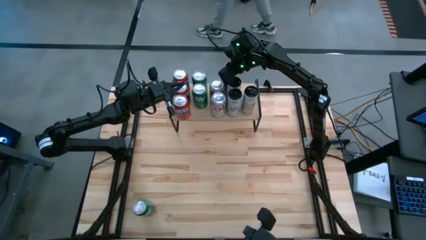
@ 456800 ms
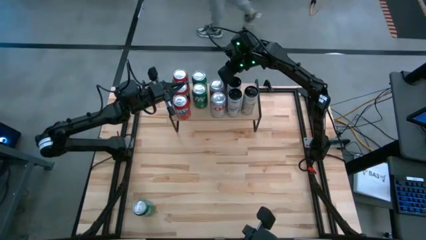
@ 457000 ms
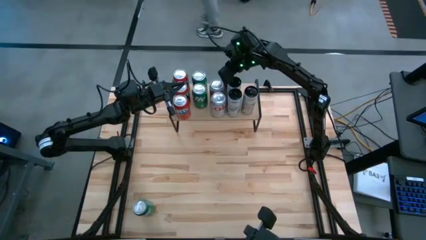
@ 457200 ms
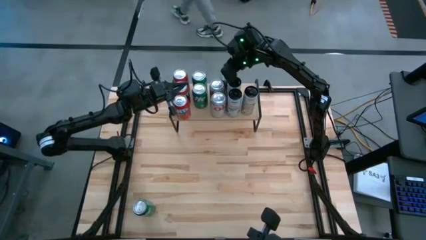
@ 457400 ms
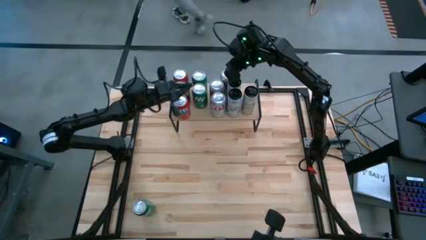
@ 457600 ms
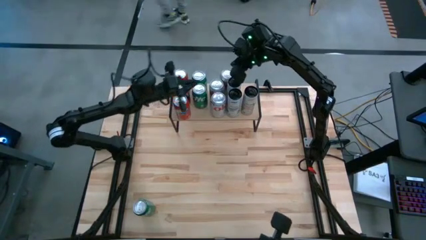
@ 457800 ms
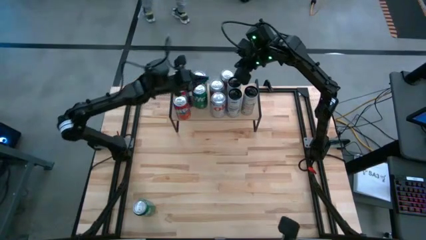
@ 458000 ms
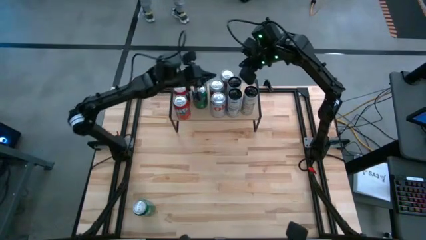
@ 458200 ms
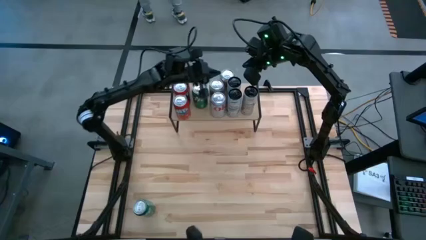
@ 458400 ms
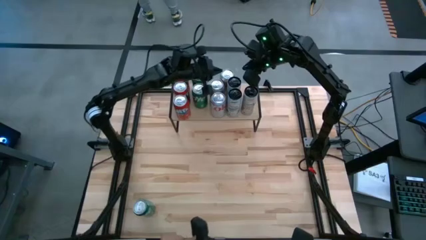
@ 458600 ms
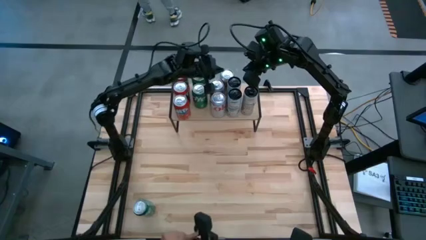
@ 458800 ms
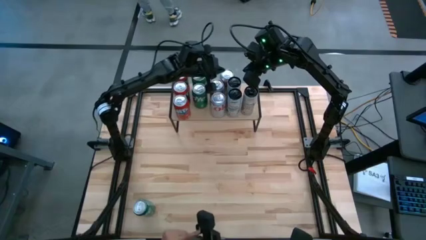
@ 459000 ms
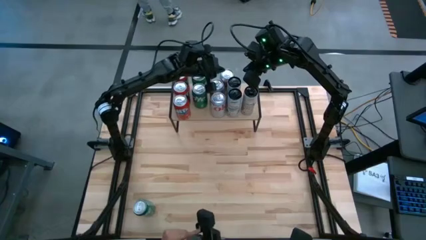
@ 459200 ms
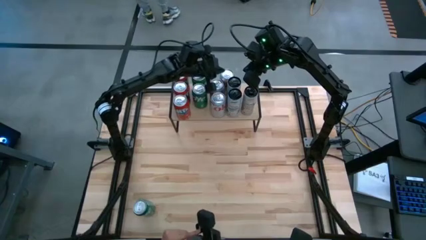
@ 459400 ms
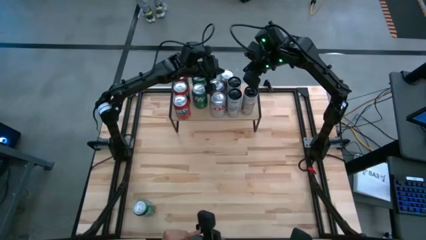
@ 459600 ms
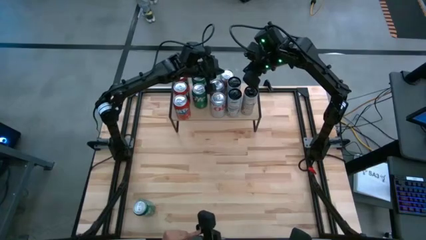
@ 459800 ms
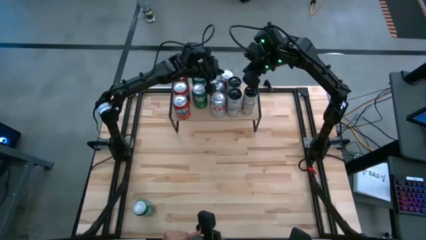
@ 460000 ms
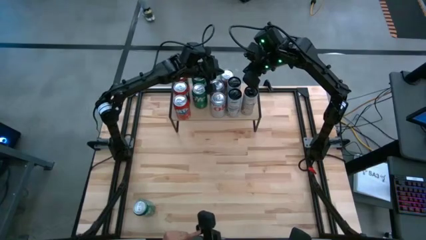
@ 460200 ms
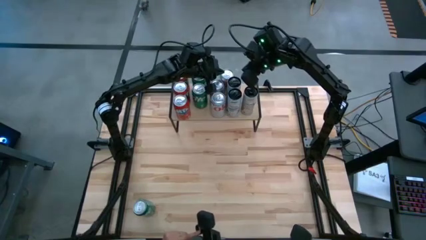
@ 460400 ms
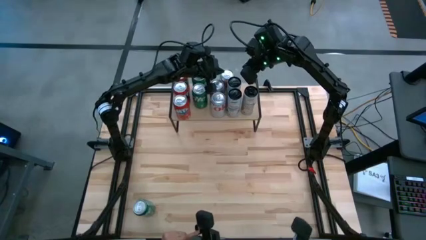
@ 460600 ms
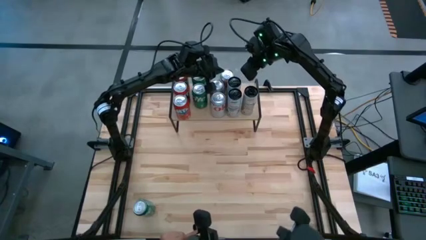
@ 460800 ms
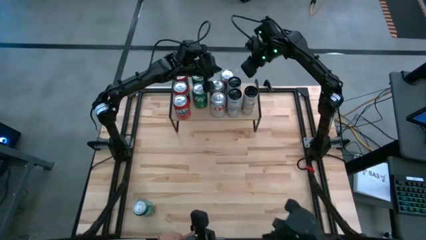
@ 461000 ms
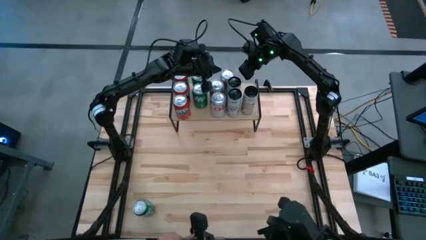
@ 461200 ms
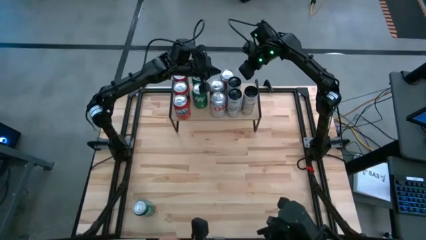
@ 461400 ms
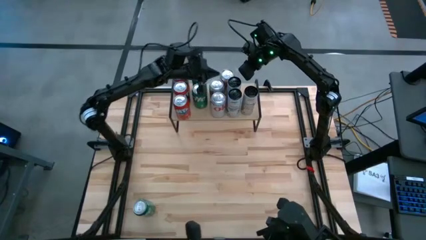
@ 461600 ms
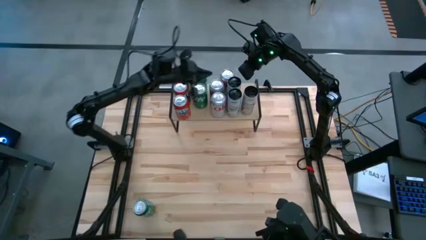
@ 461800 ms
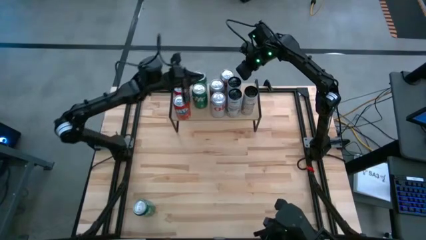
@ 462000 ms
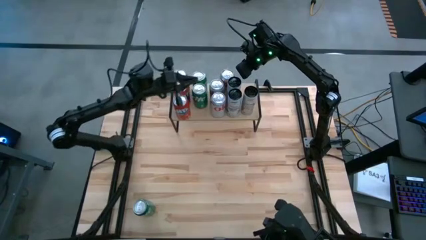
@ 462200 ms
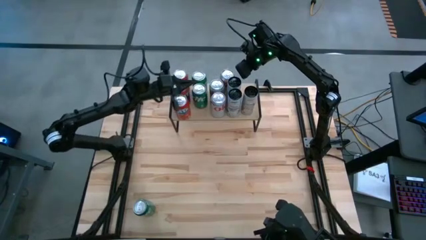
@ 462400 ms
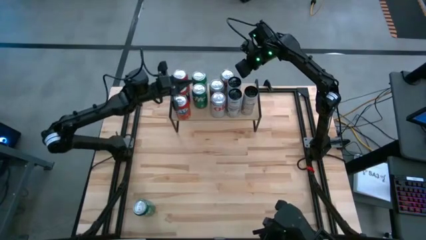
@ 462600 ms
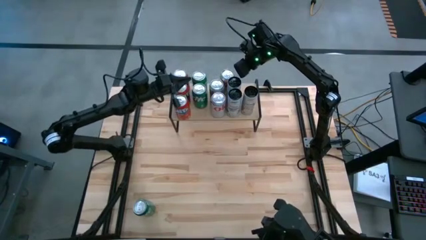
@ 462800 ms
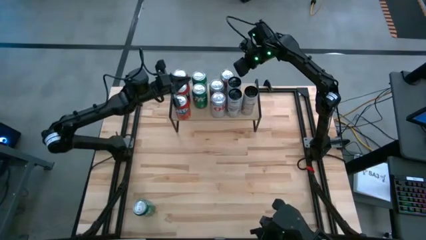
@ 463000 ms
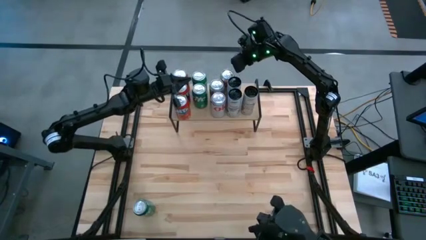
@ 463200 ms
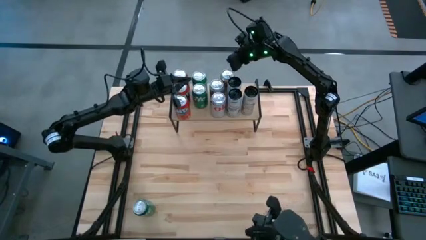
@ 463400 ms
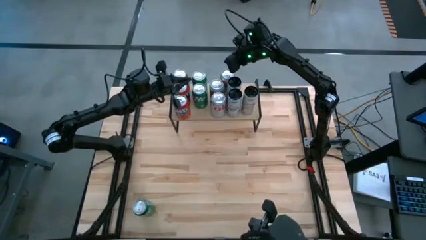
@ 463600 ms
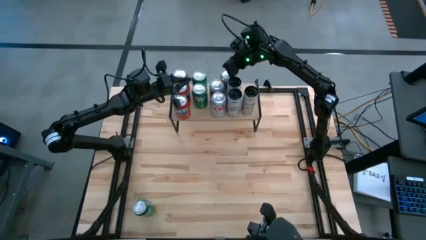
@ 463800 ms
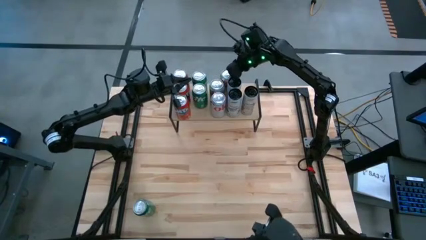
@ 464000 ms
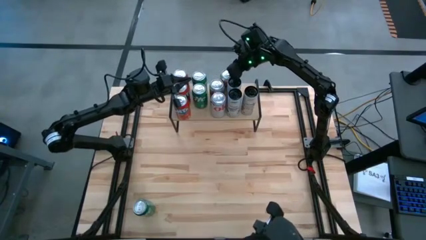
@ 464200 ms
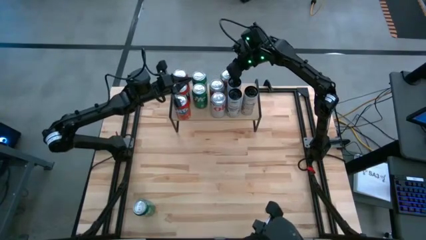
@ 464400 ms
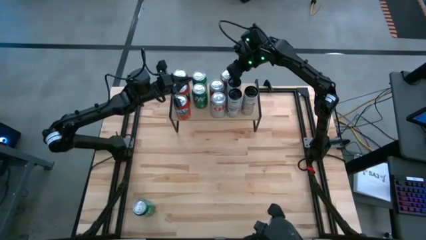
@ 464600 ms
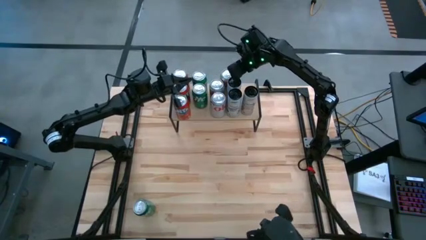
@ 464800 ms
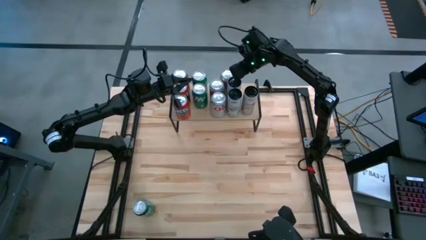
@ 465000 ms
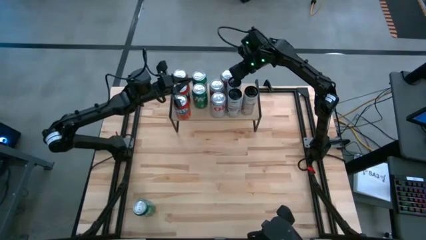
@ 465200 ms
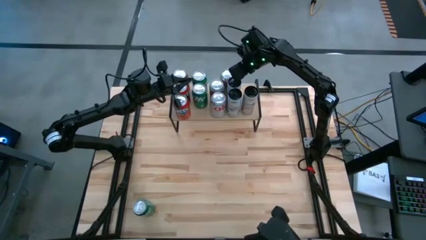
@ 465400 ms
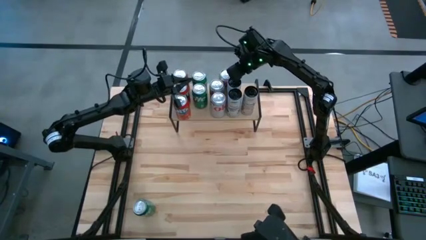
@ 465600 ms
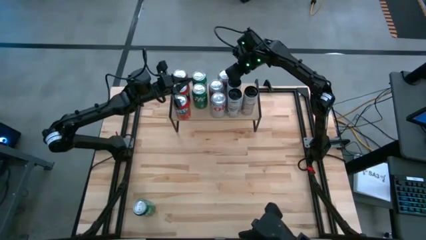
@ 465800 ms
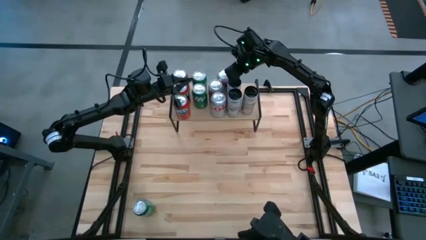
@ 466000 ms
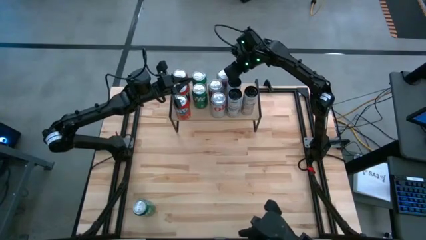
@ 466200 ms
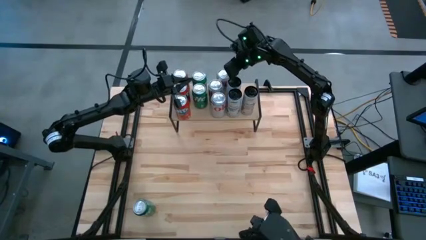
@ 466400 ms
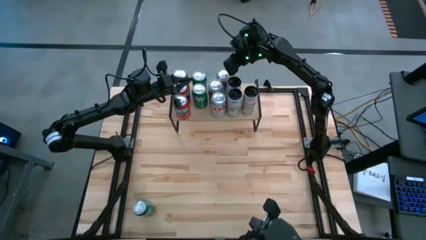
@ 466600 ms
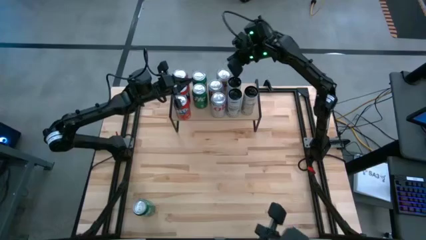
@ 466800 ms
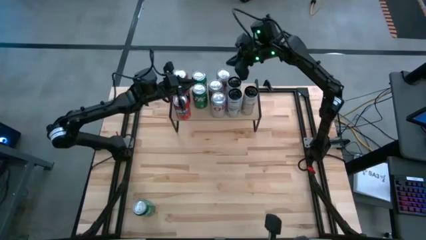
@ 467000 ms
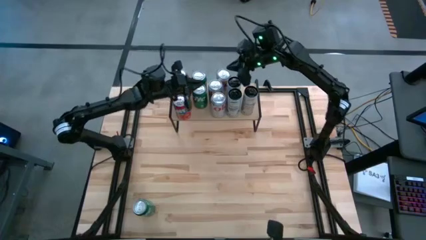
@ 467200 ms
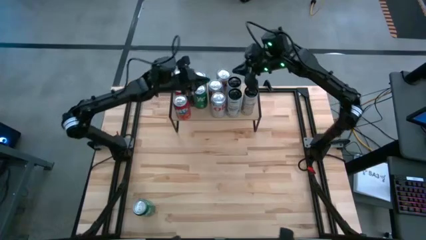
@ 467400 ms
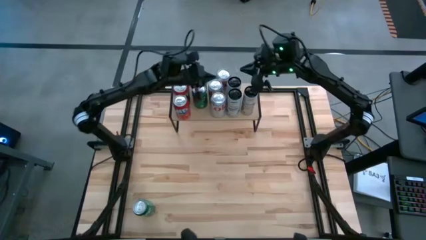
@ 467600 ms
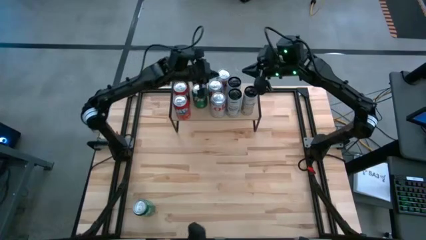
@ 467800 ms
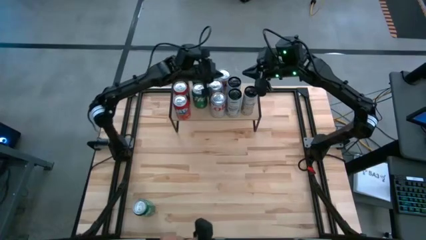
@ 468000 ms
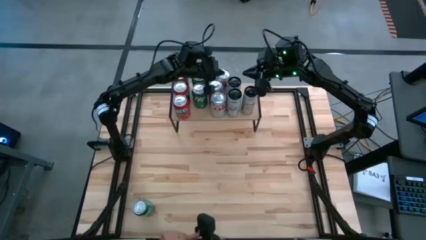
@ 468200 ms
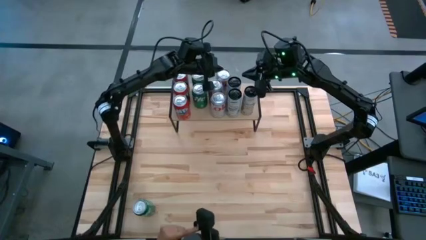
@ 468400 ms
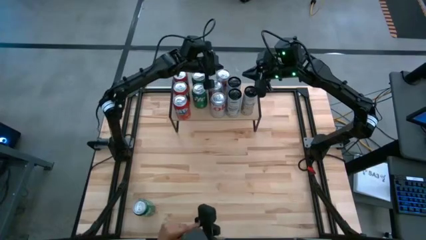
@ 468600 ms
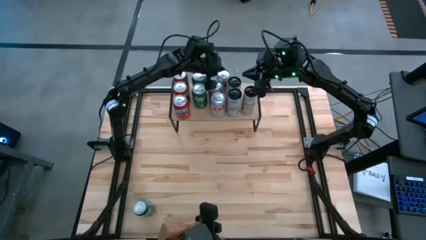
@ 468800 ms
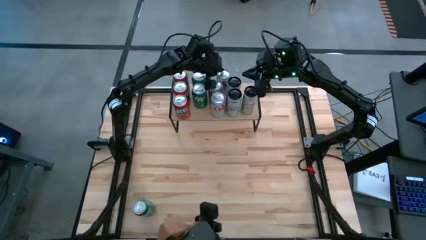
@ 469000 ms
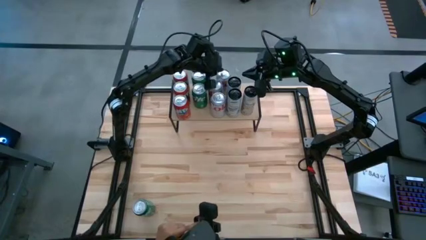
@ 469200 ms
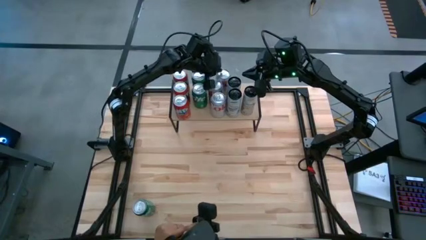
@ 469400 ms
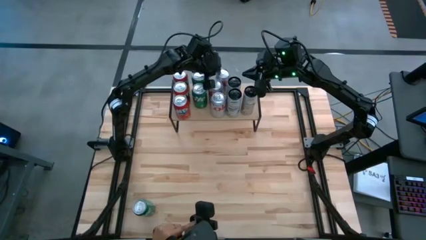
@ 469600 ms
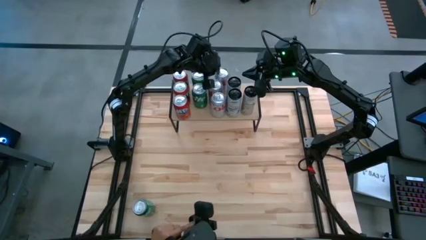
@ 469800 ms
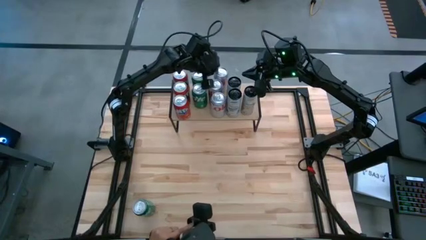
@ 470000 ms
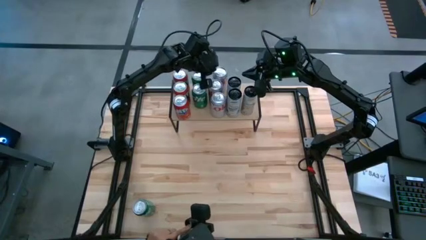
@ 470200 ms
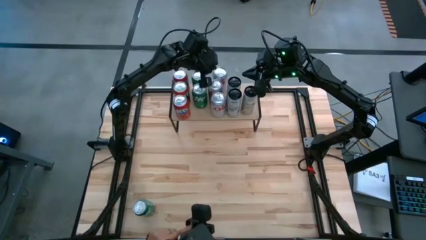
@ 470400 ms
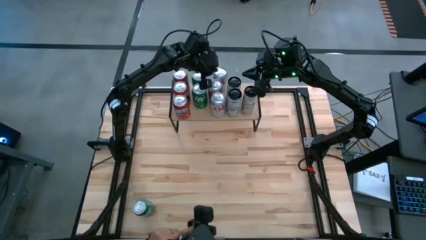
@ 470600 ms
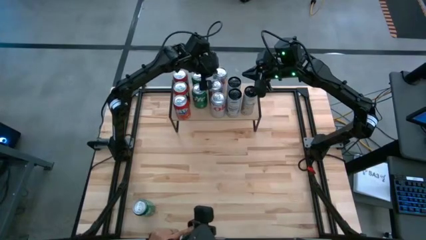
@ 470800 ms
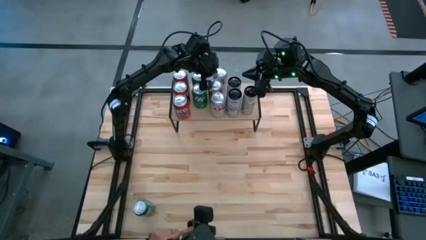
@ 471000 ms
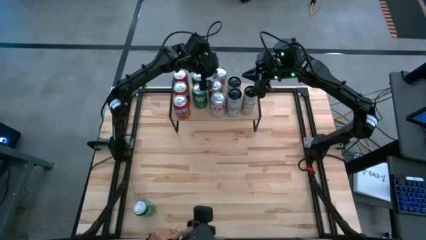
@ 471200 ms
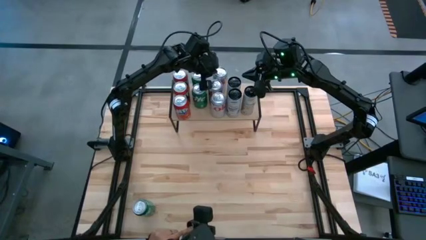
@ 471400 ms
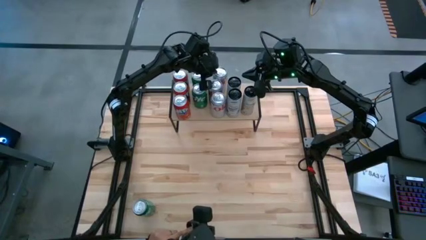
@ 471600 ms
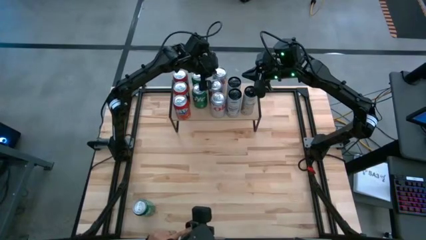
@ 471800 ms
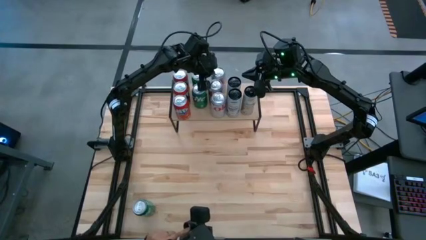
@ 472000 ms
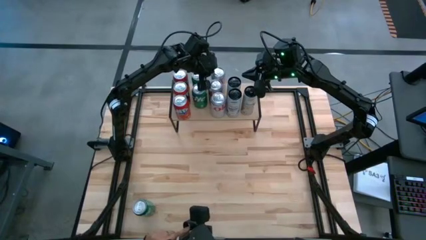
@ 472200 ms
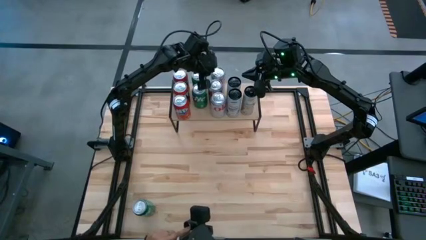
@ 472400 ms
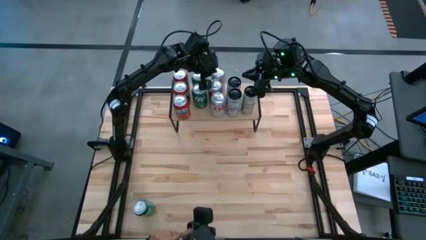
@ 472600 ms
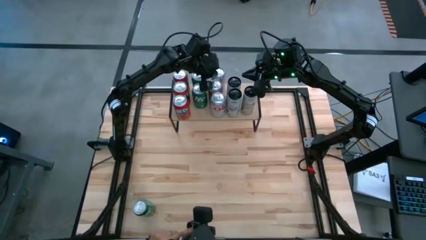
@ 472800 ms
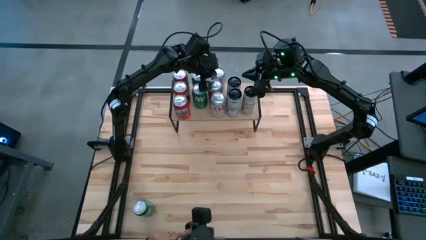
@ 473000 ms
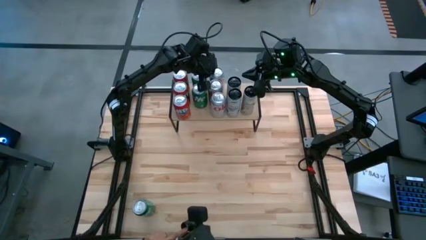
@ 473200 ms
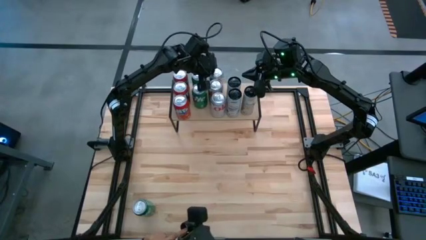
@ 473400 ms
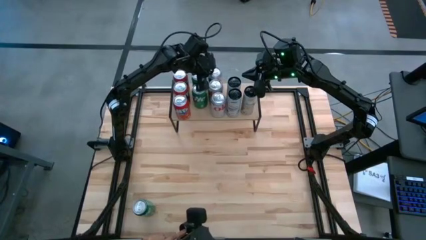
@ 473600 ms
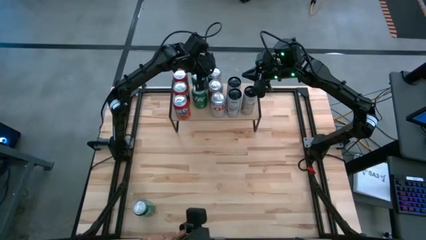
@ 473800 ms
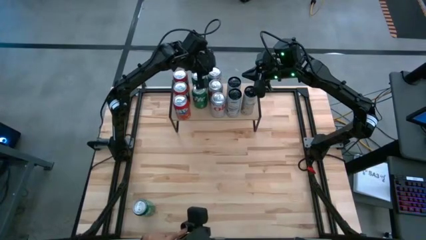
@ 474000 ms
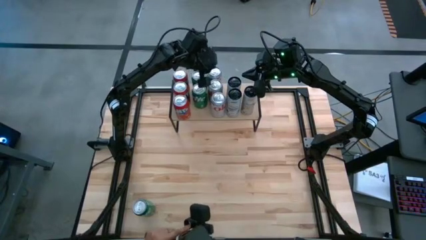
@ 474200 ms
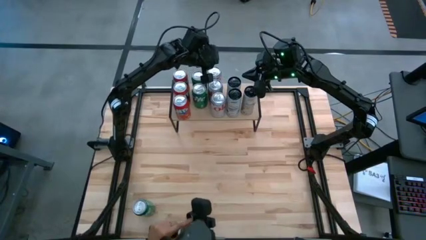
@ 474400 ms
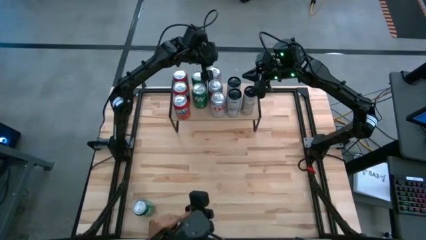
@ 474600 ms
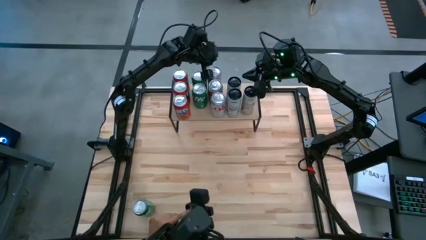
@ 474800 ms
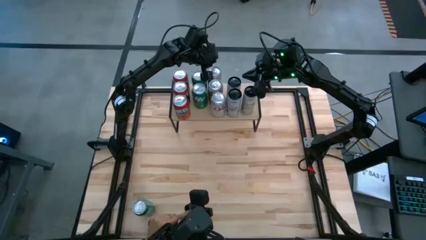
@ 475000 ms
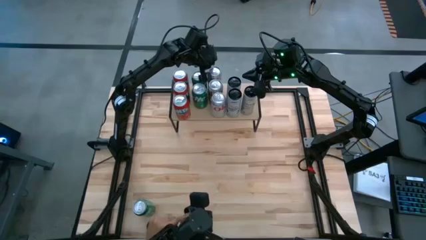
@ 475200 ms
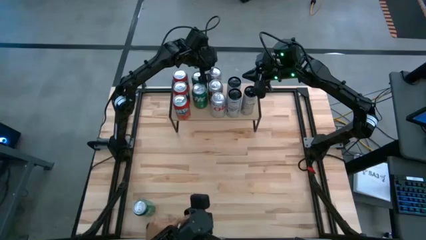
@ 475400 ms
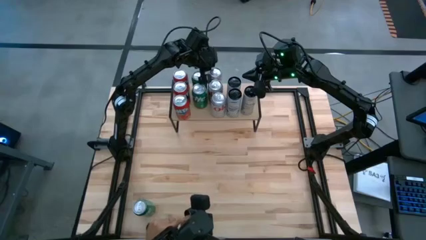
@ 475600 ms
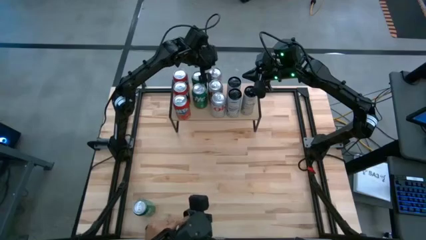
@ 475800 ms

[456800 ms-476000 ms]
Task: Place canned beverage on shelf
Put the silver soda can on the shelf aligned with the other silver soda can
